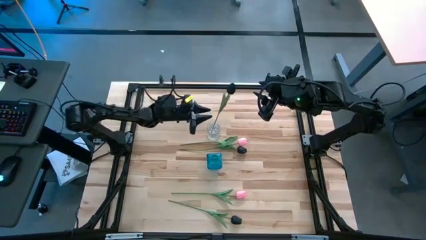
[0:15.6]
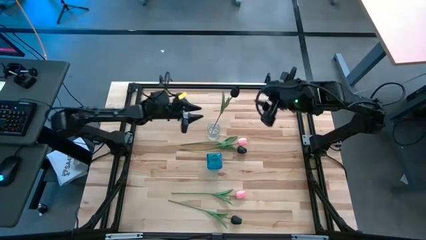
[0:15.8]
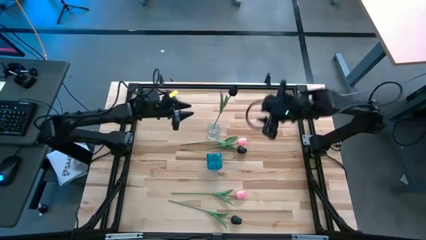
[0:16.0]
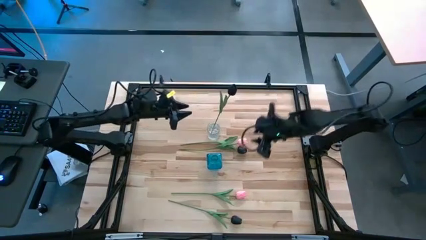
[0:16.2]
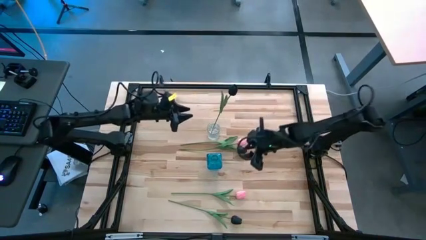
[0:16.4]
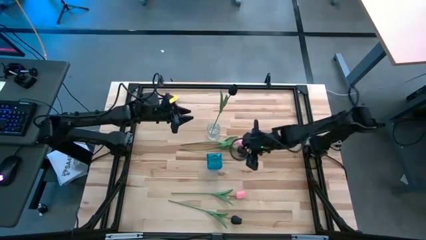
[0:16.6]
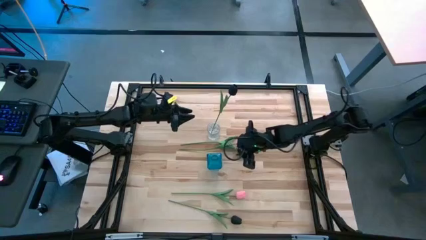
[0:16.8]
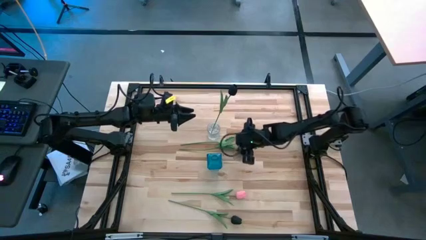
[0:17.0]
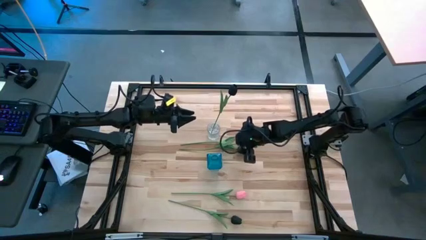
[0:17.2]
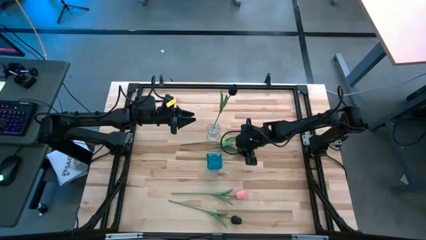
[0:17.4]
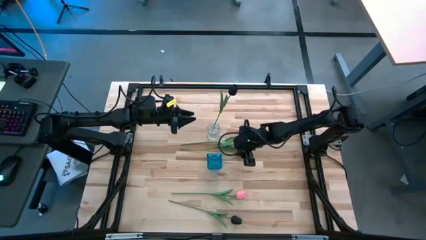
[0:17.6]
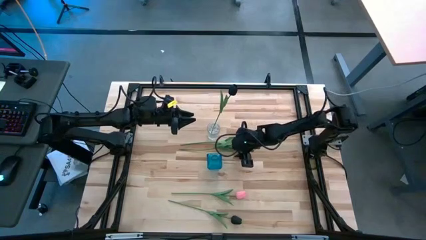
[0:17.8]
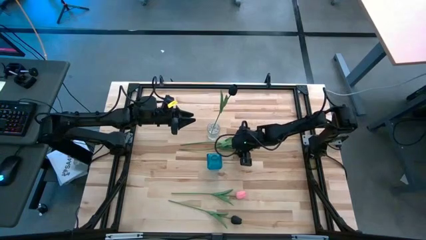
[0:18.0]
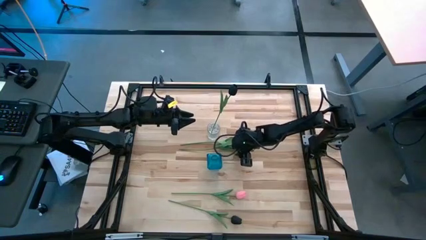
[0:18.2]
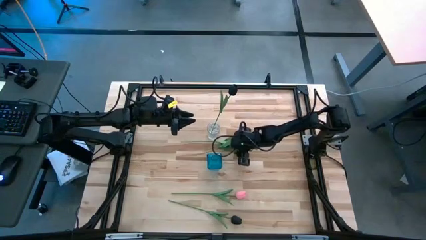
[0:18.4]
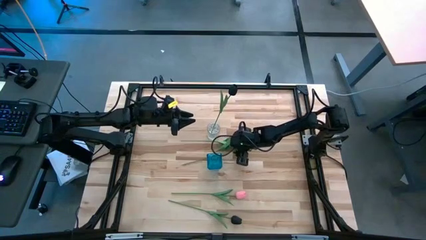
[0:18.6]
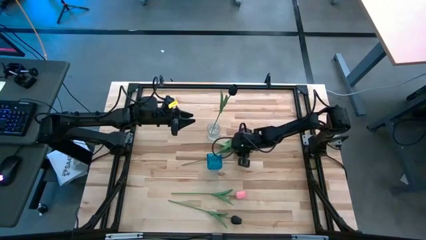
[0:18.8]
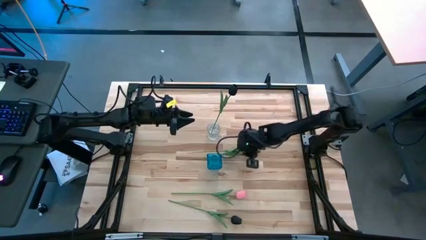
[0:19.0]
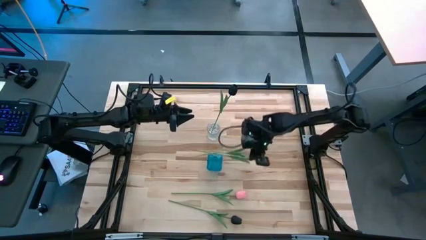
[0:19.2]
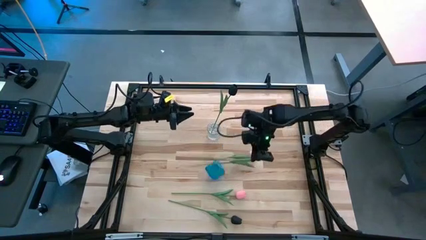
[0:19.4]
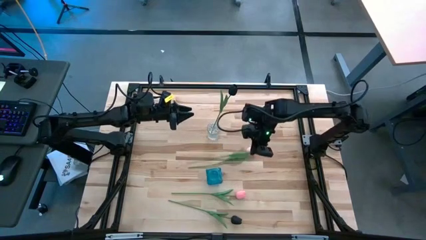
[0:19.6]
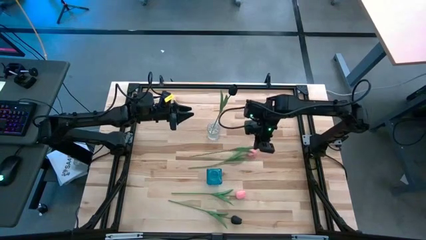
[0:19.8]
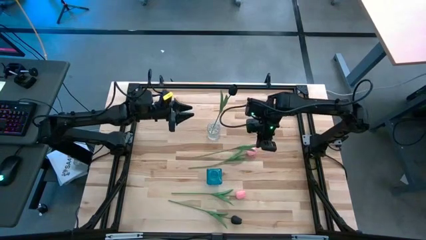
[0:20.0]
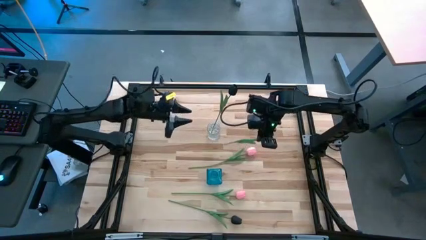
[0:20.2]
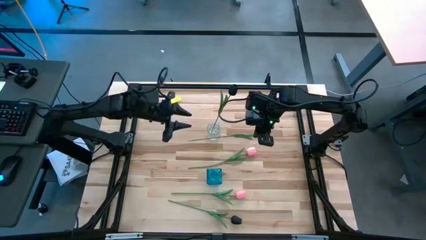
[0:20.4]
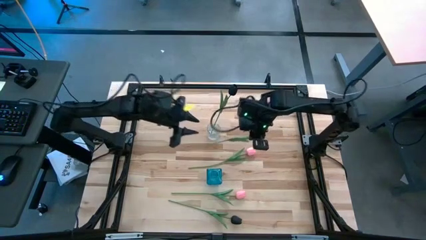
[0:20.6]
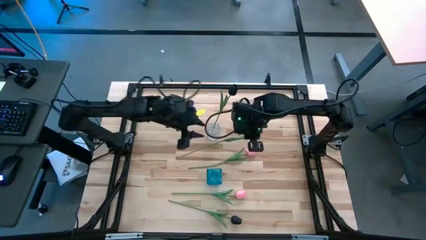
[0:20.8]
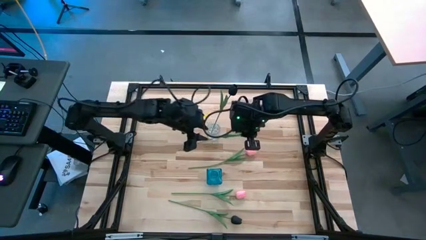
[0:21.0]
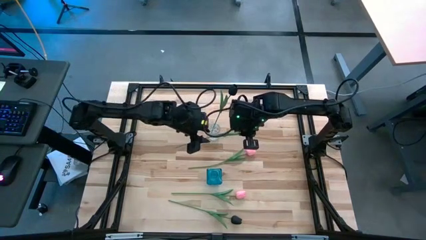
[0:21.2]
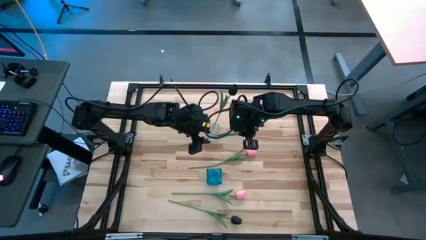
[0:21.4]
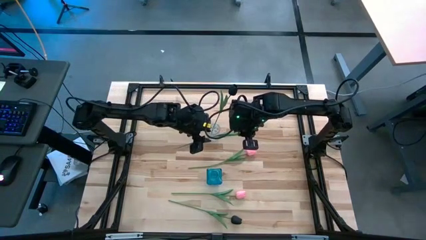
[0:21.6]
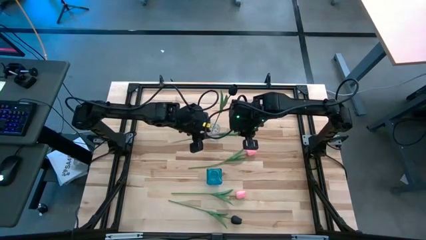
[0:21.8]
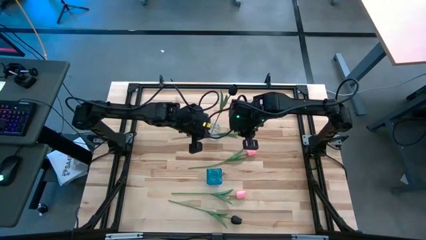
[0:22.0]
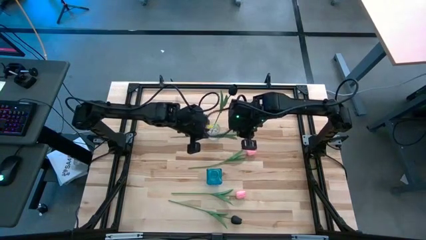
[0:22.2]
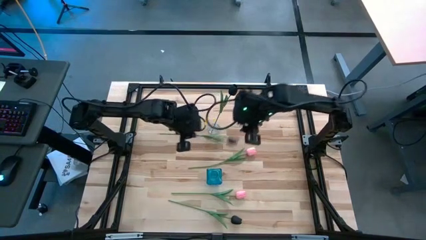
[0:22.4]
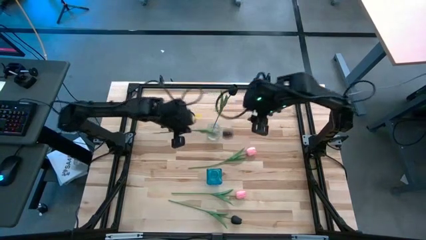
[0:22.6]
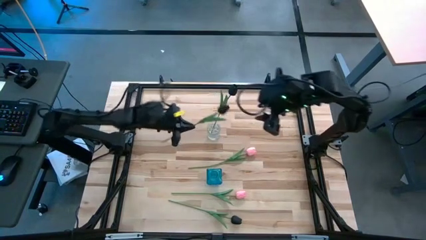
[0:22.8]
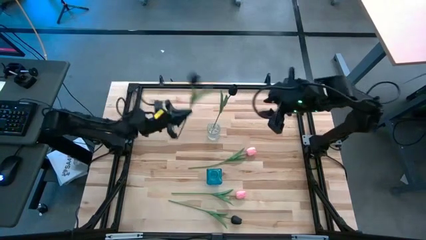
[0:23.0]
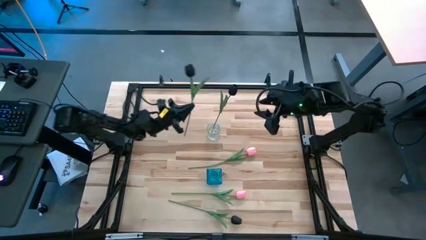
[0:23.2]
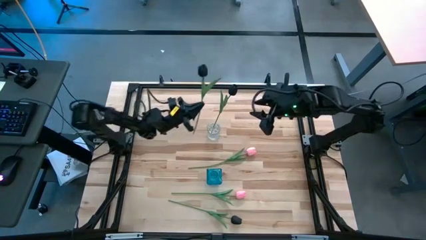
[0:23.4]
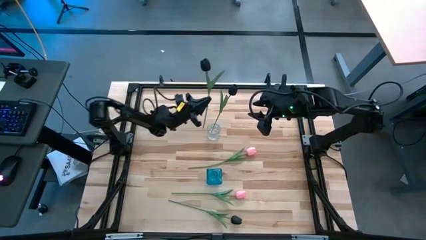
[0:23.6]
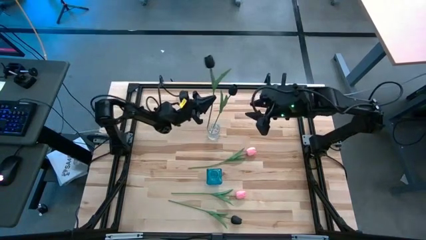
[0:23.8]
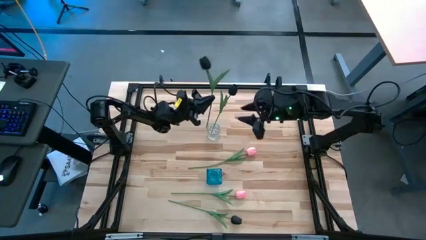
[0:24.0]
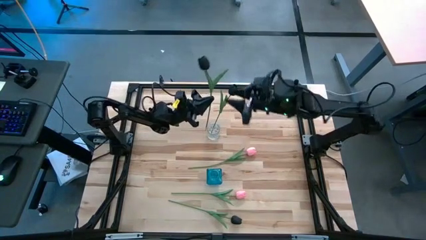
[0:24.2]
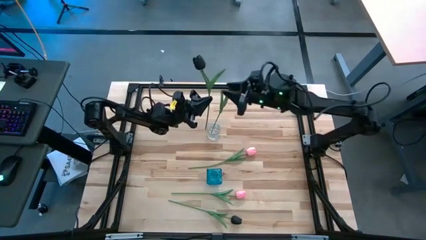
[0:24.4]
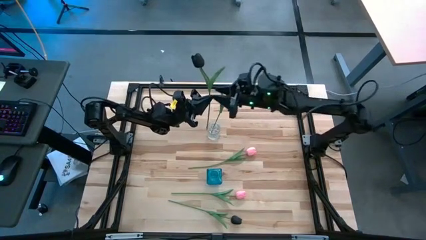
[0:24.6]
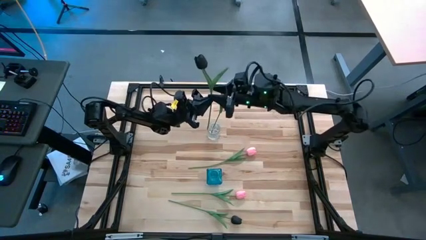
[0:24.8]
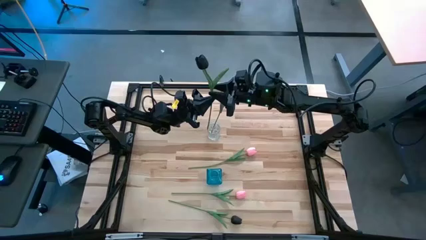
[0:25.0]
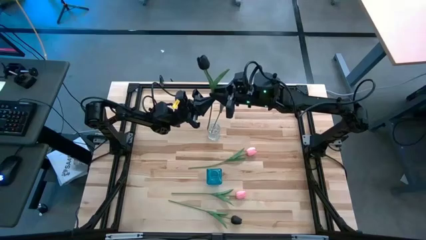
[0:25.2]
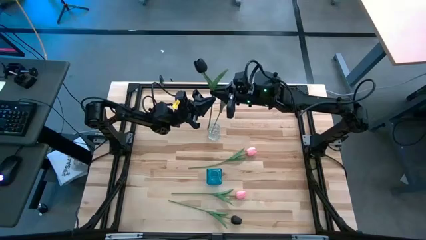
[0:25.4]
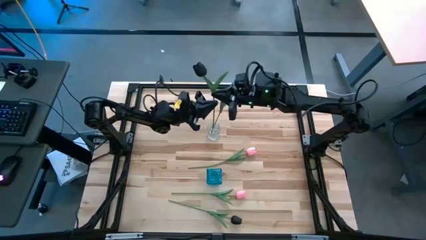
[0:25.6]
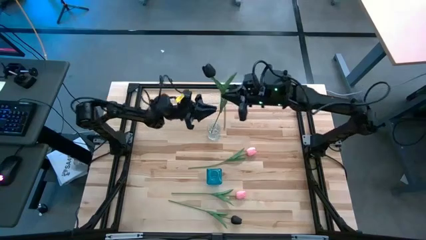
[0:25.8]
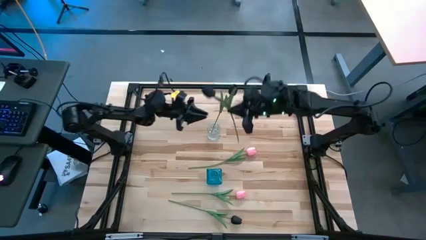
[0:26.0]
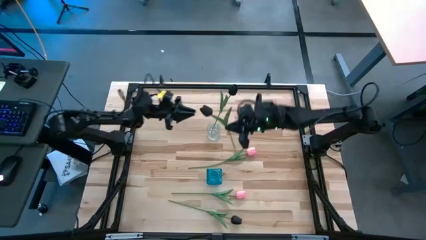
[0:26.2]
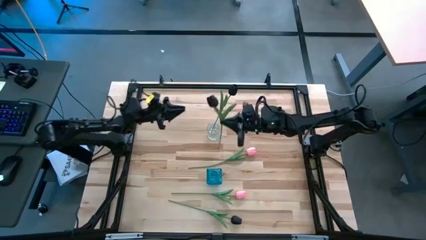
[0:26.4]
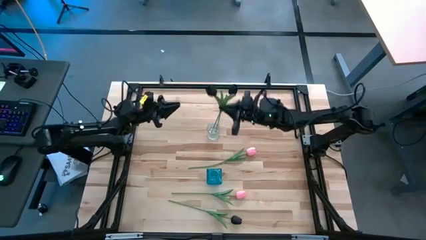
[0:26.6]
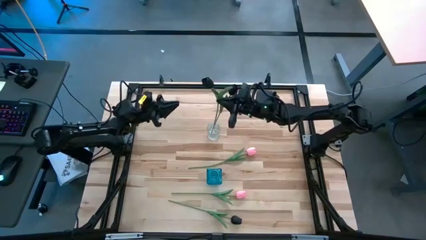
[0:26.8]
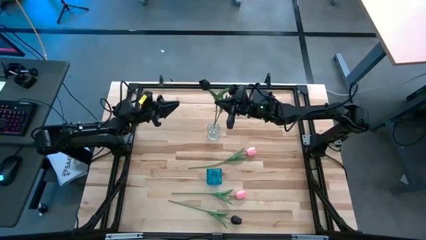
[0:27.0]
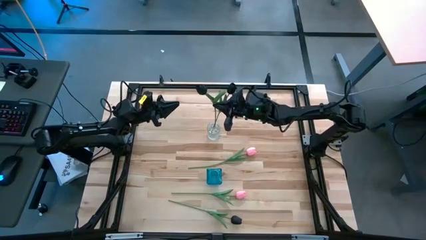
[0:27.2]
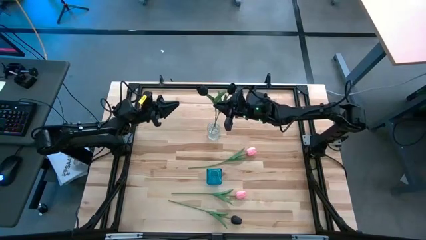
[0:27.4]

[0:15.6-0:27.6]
Task: Sort flowers into vase by color
Put the top black flower into the transparent vase

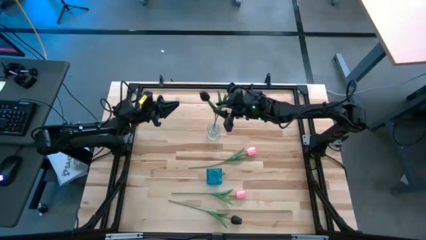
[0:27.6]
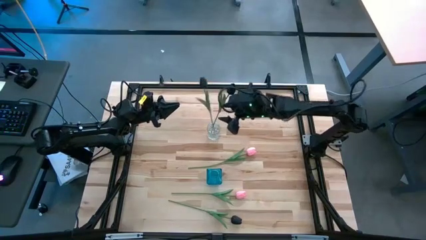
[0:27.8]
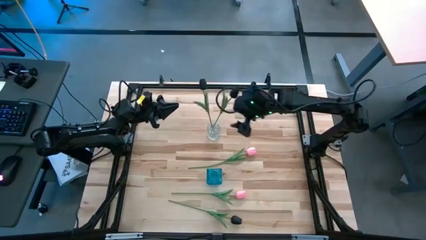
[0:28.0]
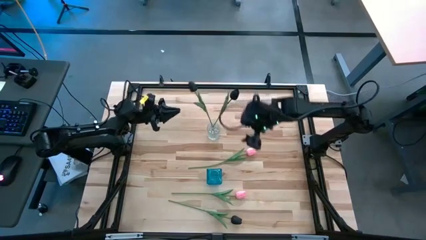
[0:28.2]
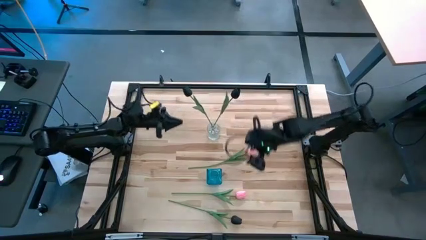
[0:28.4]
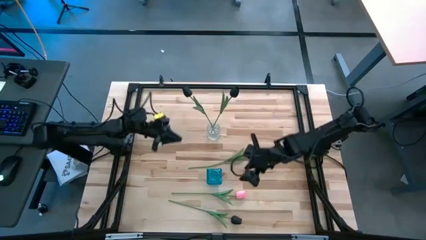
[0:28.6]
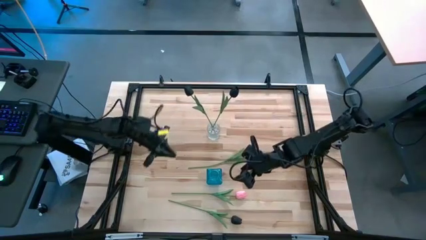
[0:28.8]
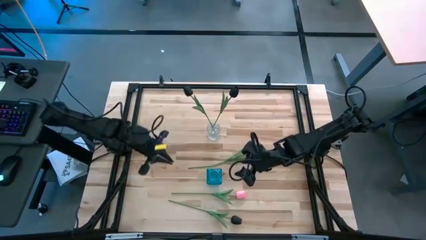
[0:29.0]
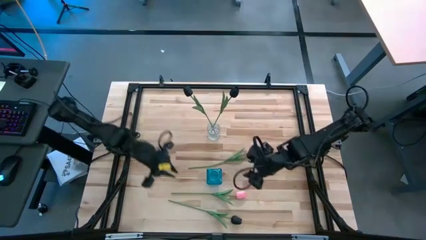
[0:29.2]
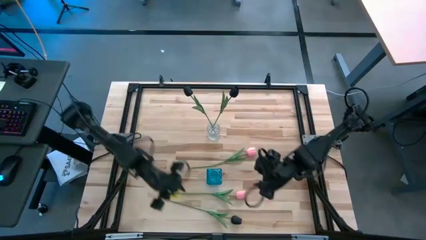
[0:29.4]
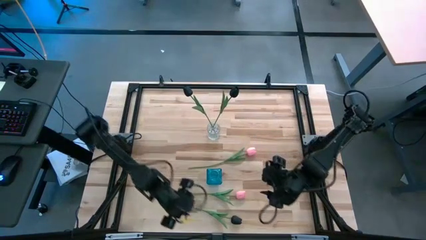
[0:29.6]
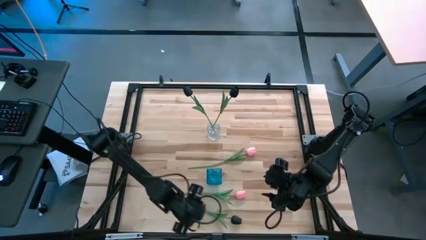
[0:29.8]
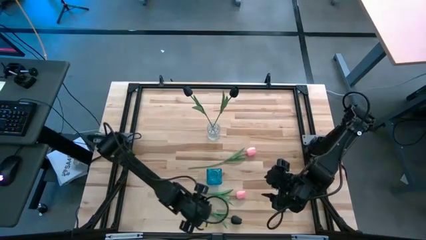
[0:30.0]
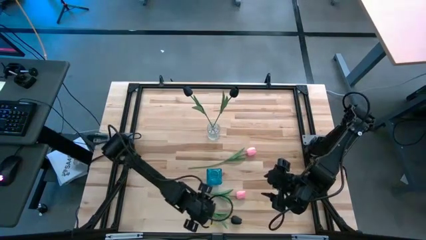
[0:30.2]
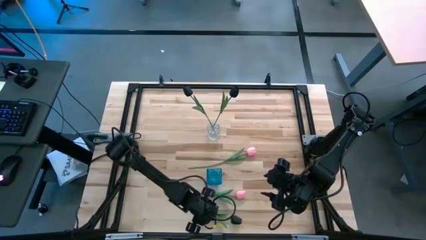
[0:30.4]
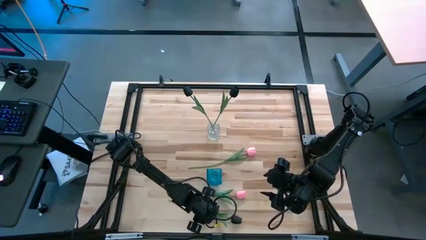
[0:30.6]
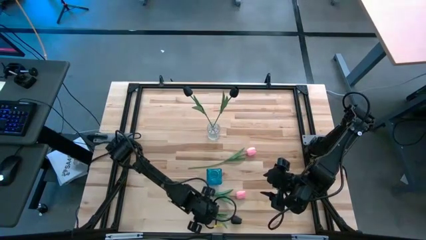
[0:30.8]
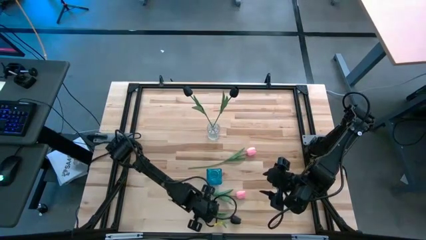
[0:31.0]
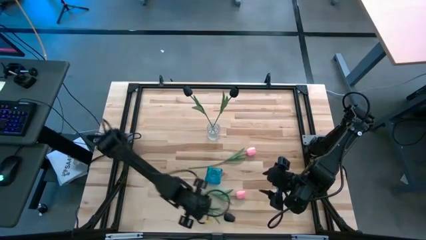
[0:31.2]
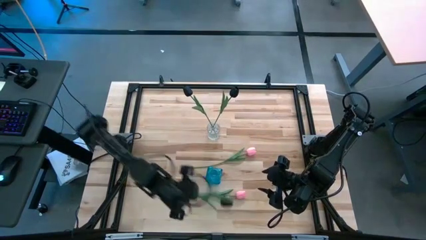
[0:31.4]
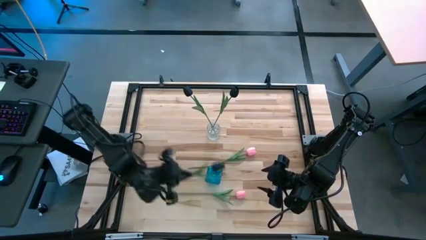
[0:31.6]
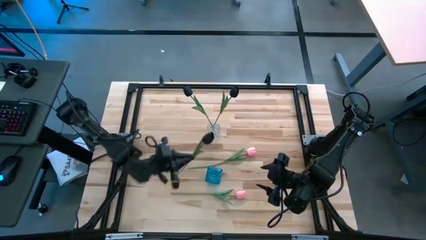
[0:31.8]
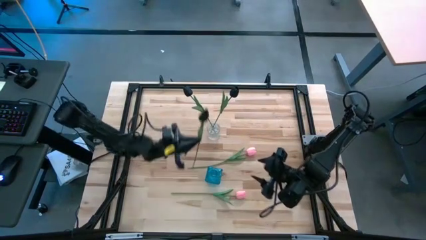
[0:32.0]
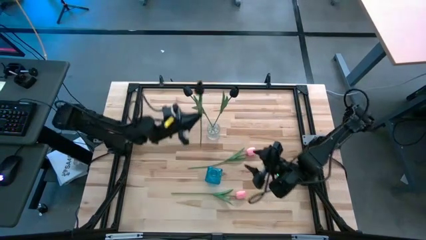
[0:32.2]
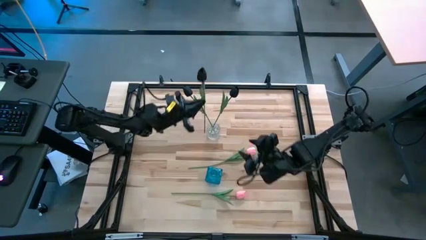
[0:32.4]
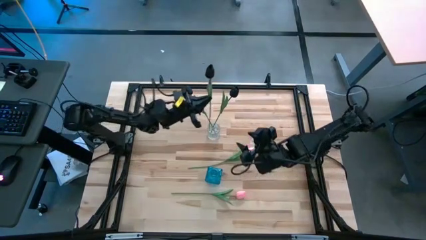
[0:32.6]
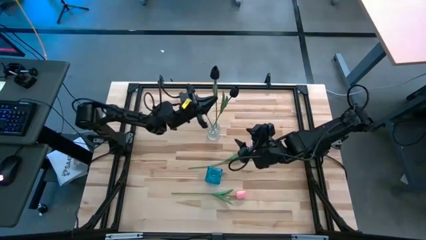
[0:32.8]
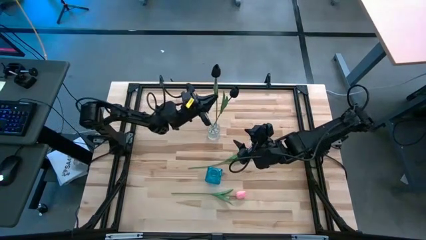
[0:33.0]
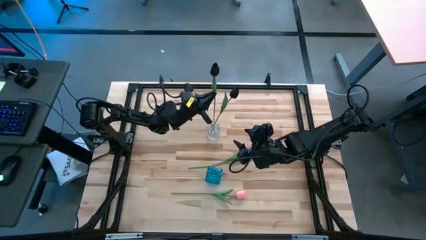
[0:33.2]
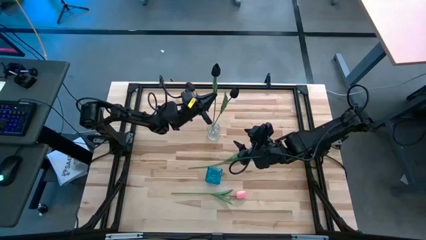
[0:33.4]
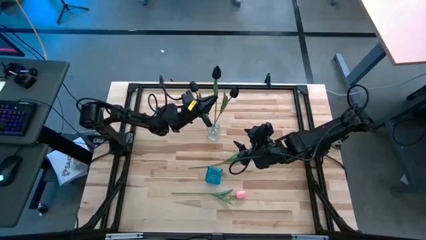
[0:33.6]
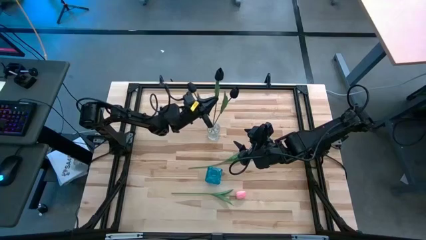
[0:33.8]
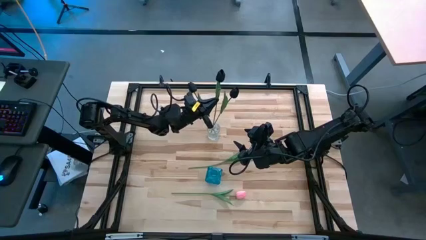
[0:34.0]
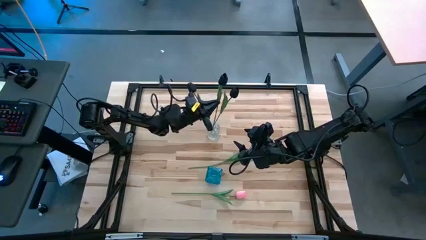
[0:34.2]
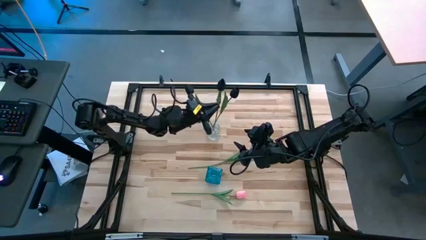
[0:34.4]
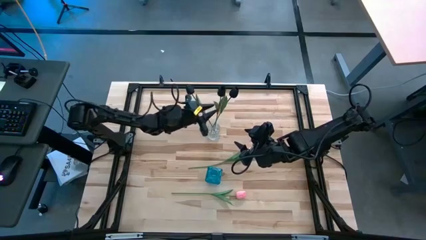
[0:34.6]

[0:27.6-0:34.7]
Put the black flower into the transparent vase
